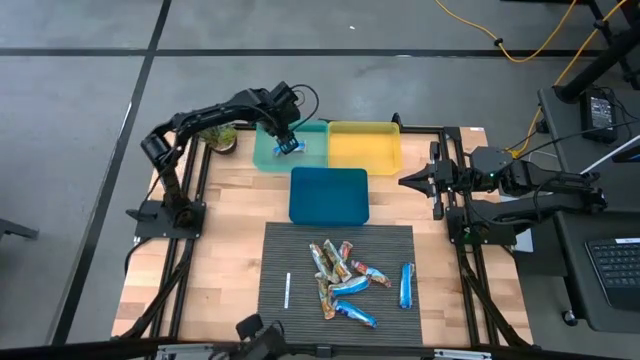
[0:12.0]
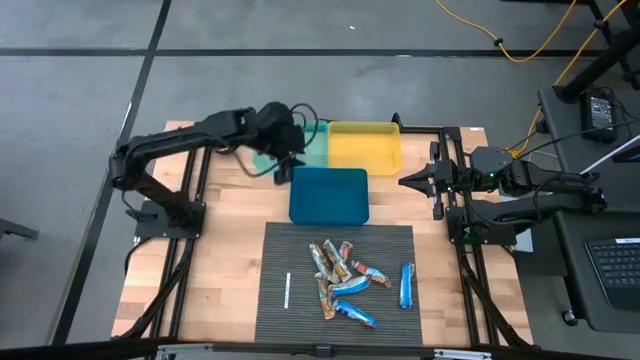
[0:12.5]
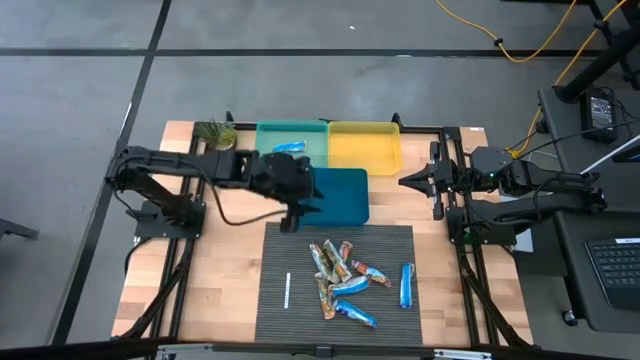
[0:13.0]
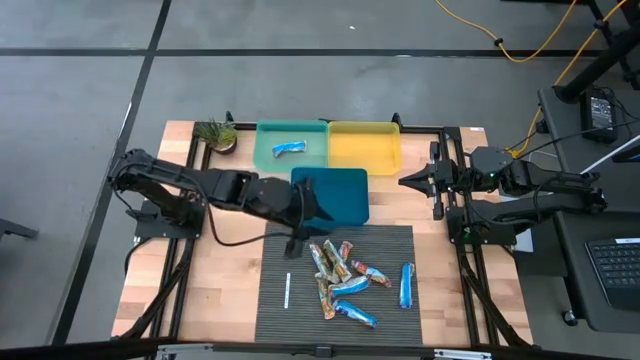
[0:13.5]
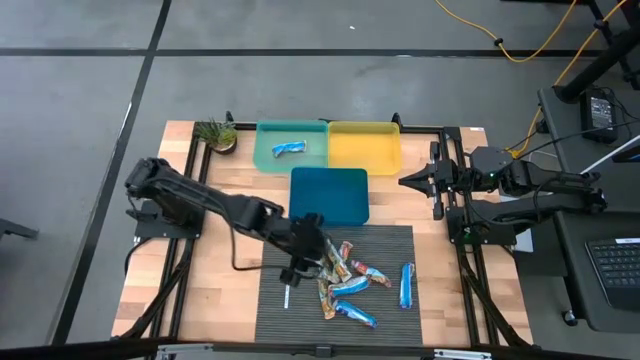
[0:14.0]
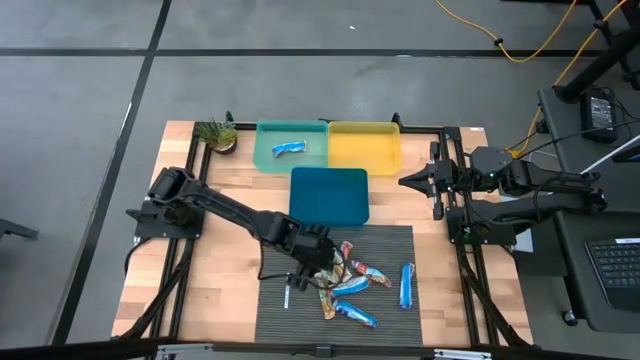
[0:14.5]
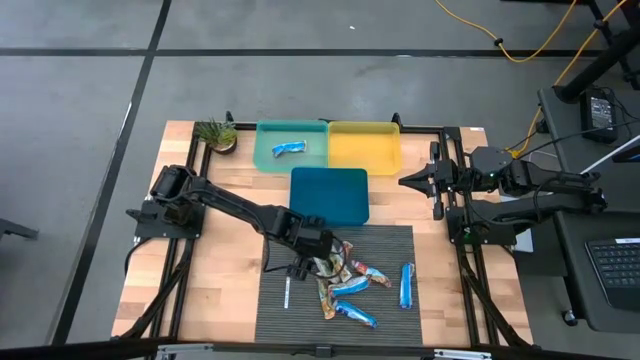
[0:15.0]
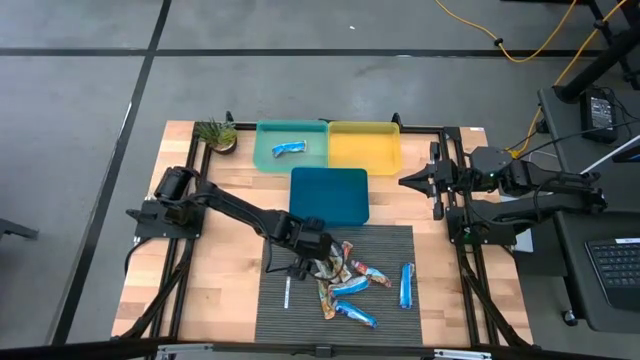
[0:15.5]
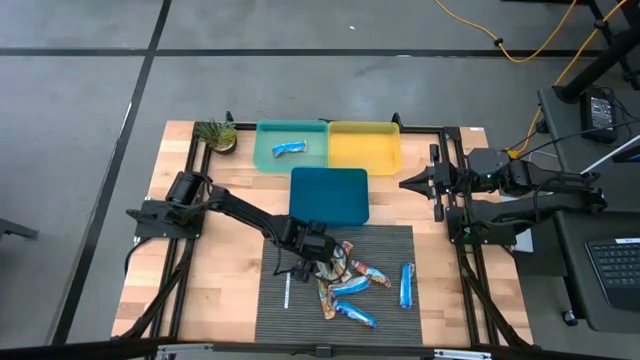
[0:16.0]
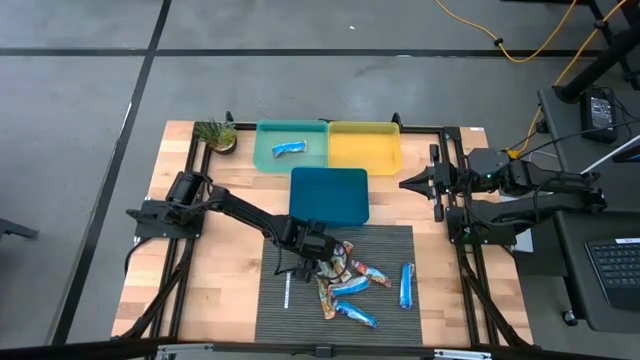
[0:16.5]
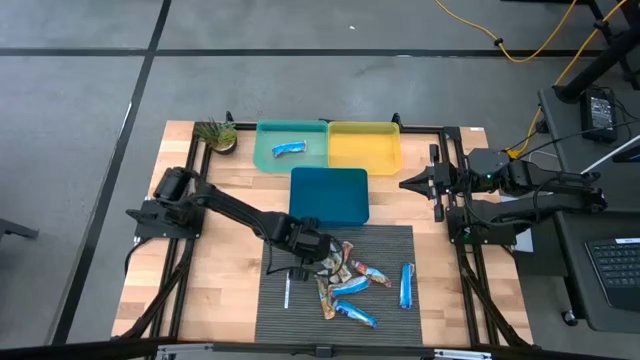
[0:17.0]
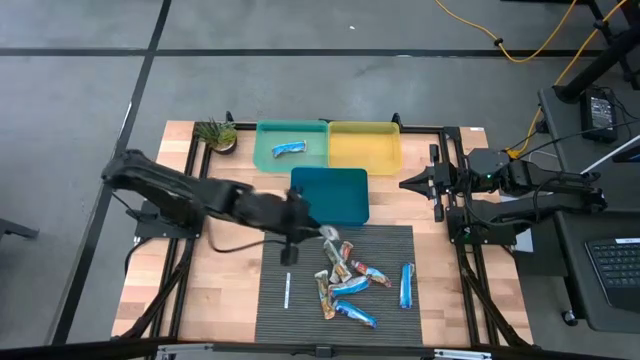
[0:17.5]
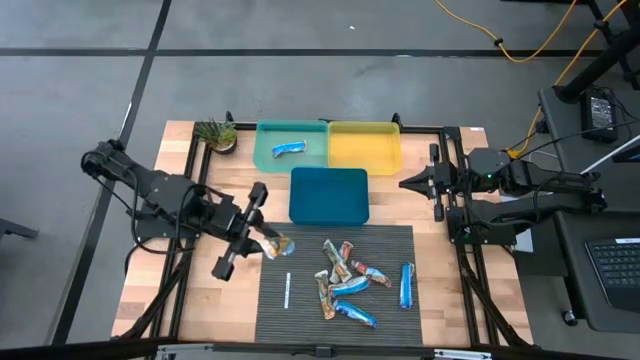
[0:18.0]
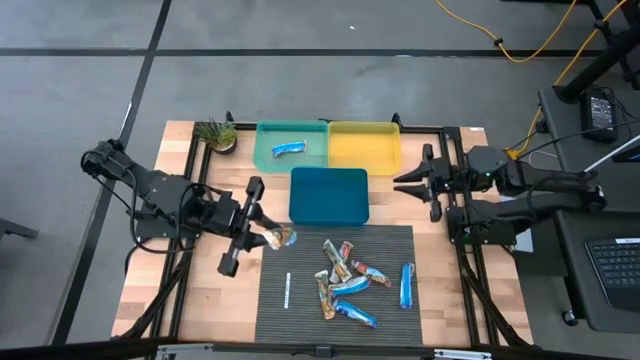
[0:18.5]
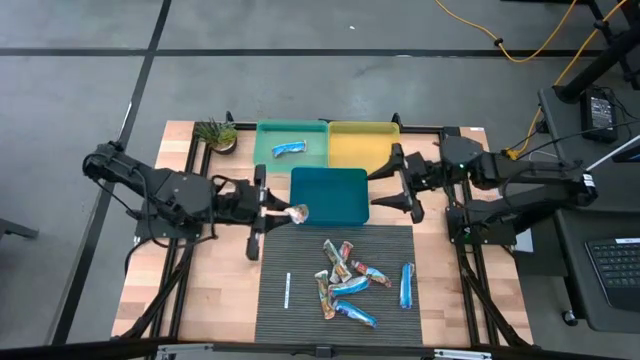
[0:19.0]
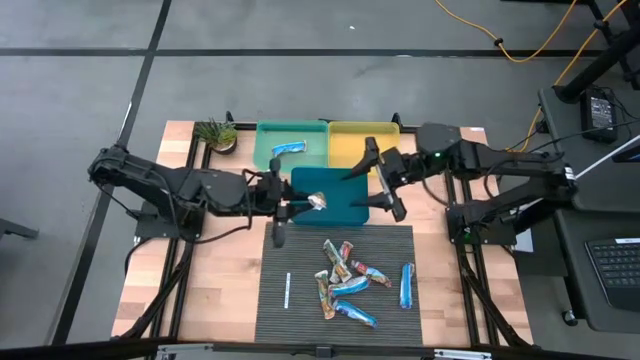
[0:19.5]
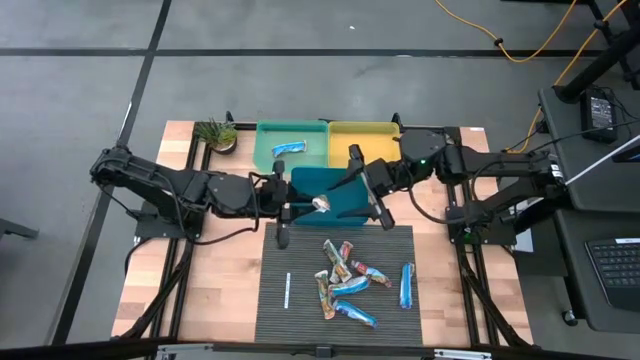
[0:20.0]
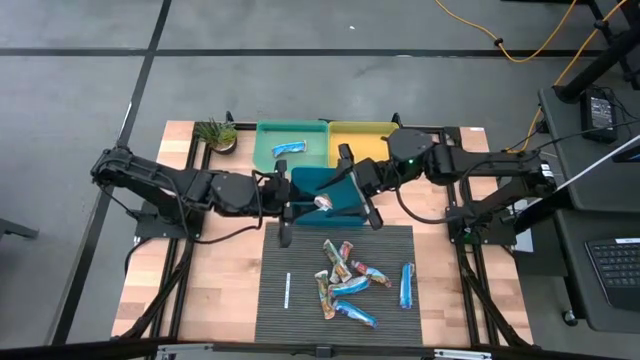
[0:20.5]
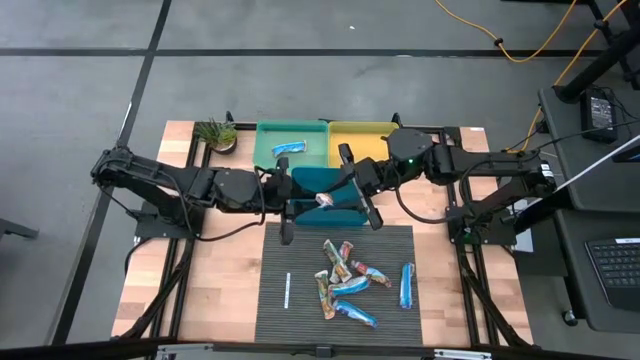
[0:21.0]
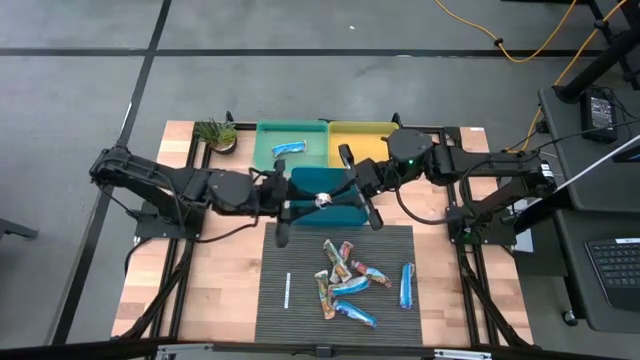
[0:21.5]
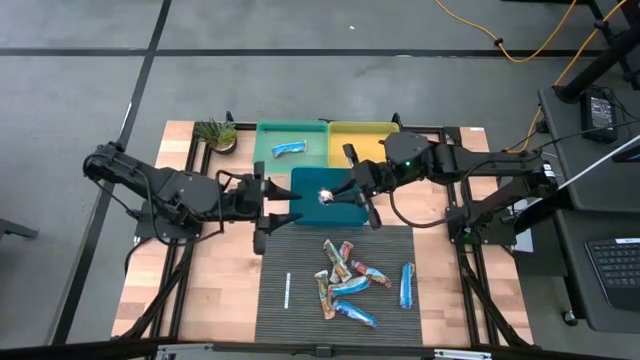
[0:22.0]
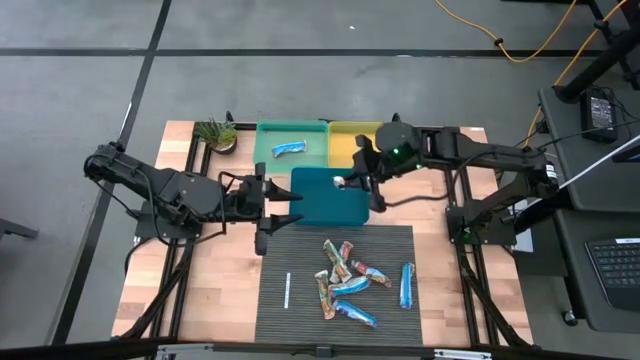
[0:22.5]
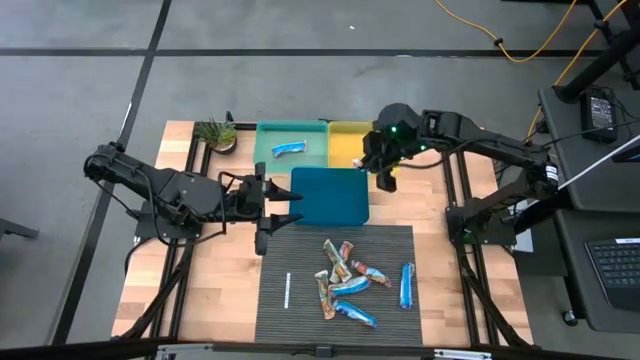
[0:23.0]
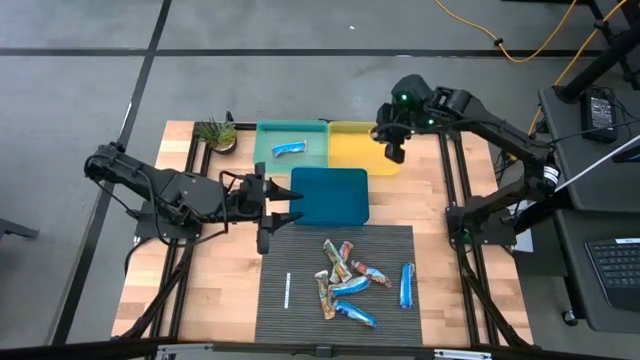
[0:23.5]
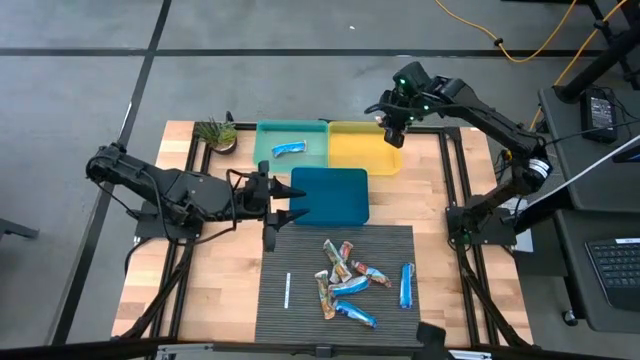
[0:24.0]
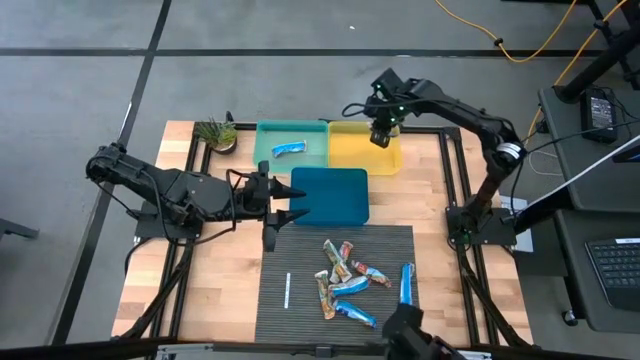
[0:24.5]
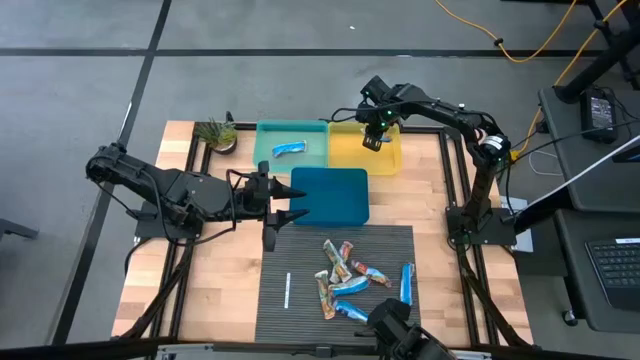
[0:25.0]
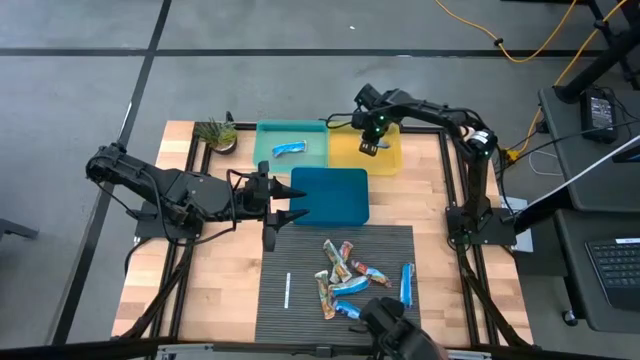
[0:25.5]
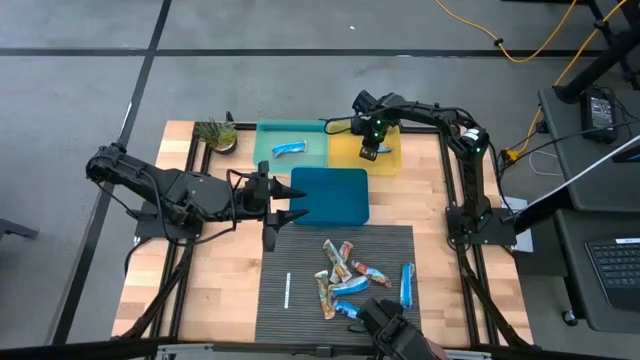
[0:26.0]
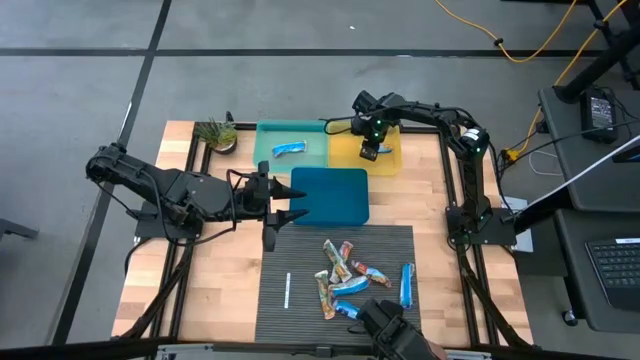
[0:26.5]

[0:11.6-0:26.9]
Task: Pick and place Granola Bars by type
Put the yellow granola bar into the yellow bin

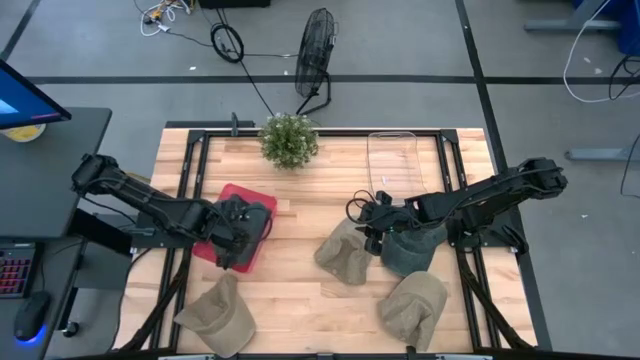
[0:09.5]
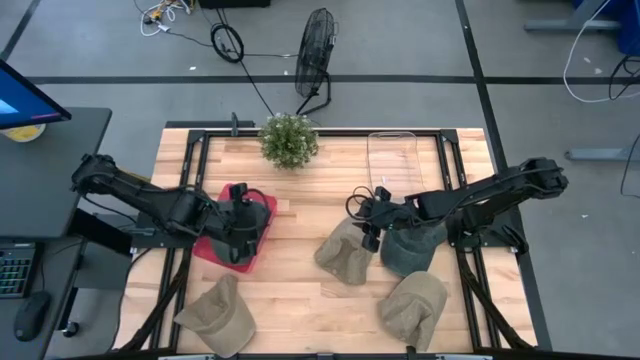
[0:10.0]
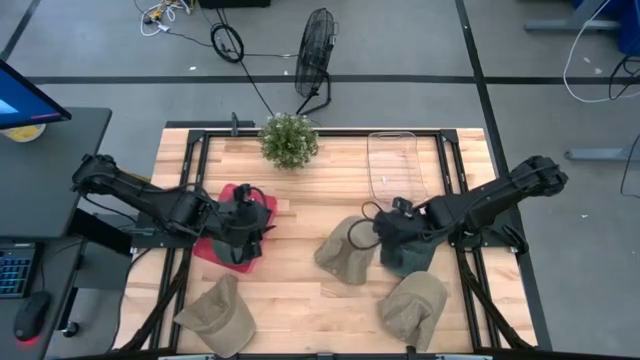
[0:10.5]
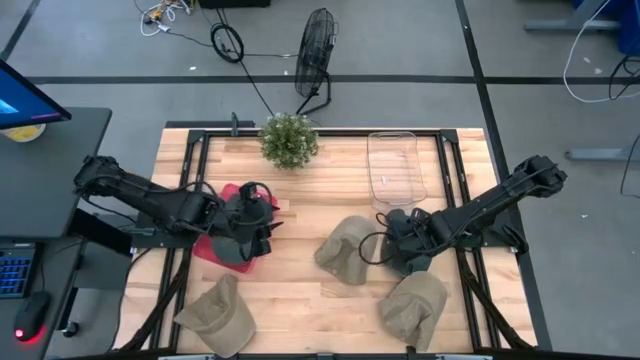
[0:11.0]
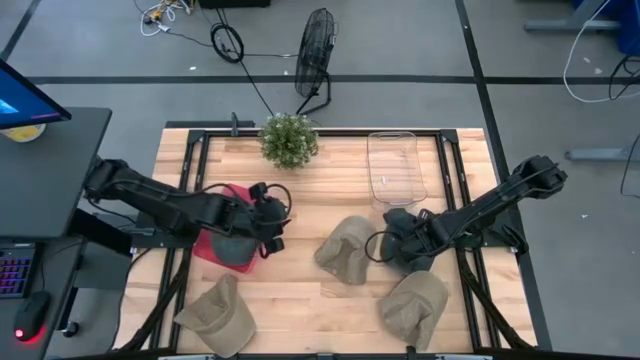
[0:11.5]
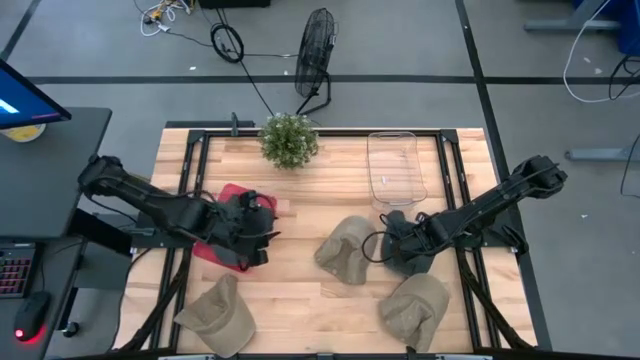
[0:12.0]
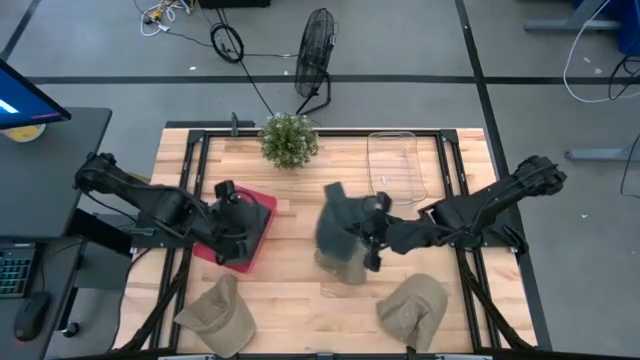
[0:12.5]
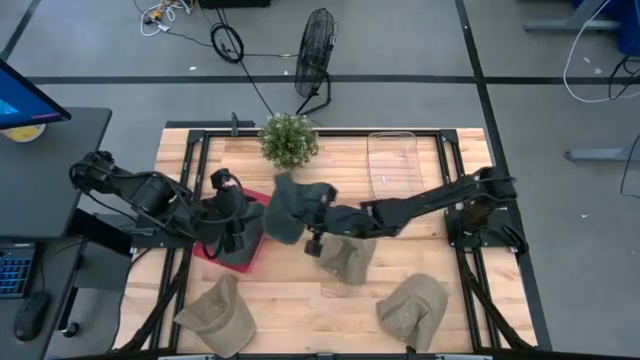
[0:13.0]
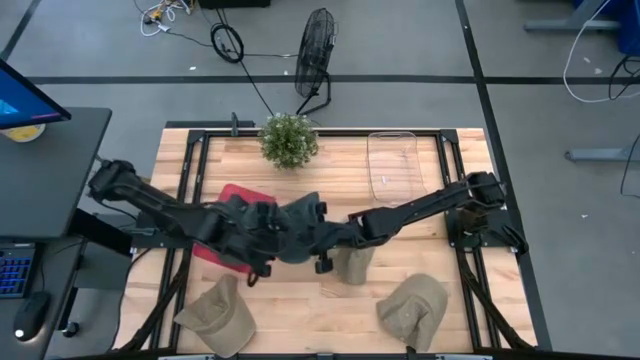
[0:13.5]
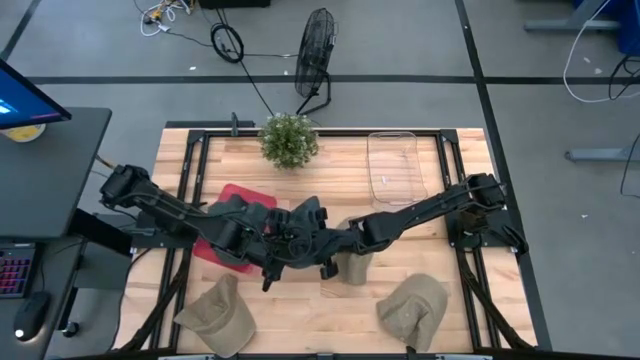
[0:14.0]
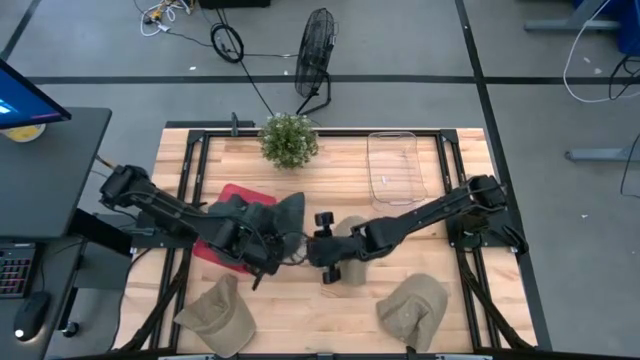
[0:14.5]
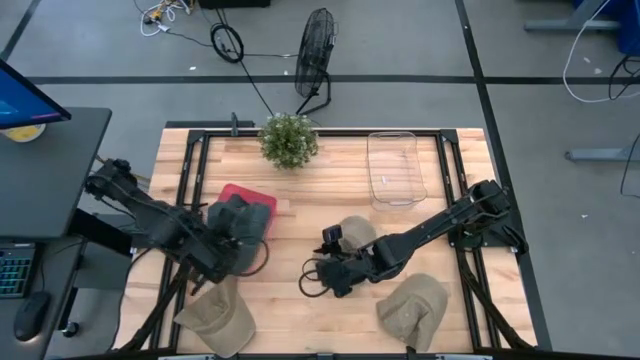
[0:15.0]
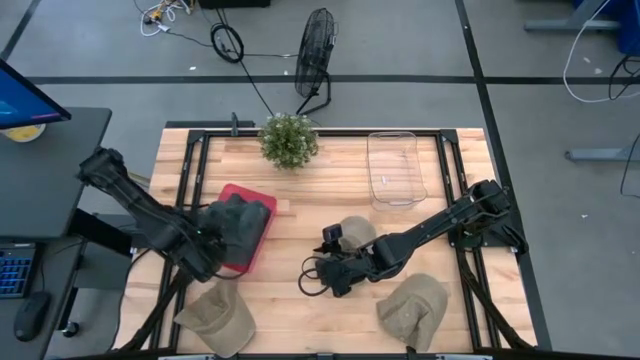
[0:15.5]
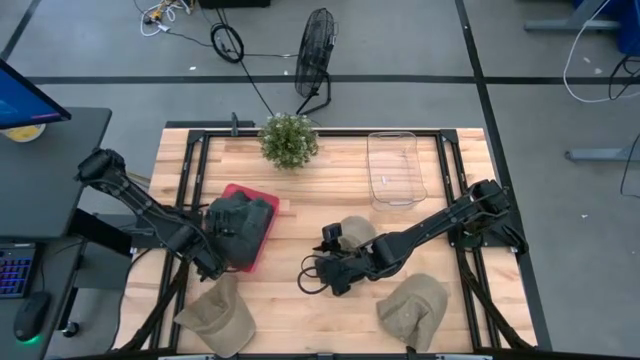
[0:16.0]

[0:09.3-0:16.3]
Task: Pick & Place hat
Put the black cap into the red bin
